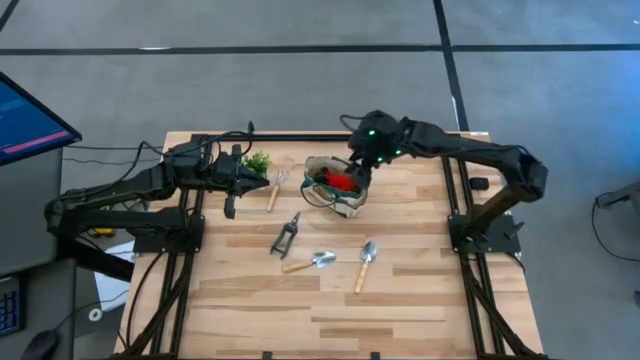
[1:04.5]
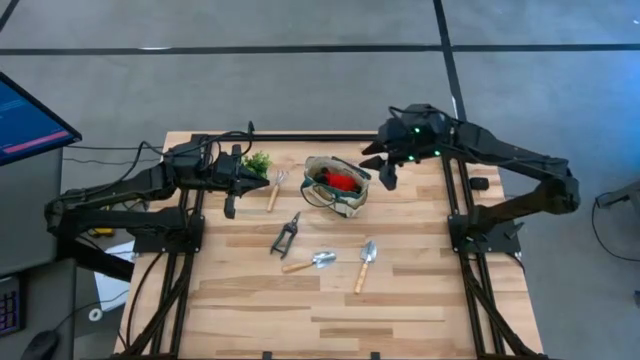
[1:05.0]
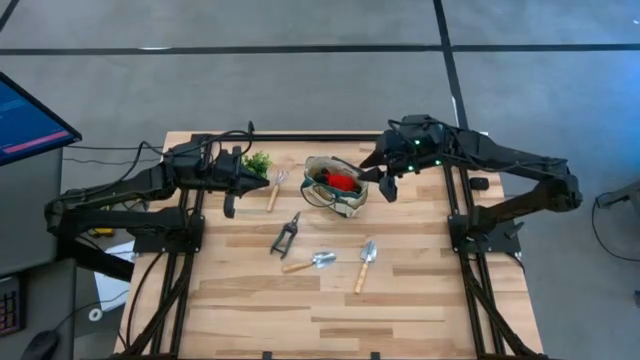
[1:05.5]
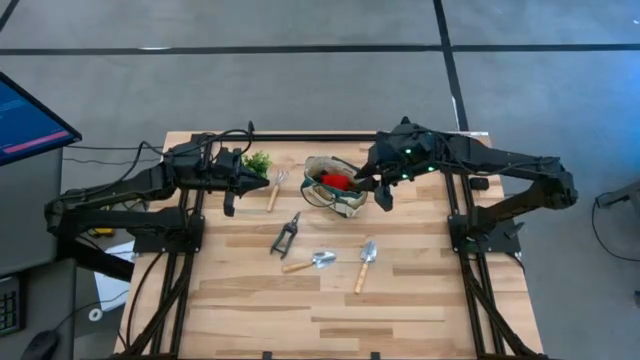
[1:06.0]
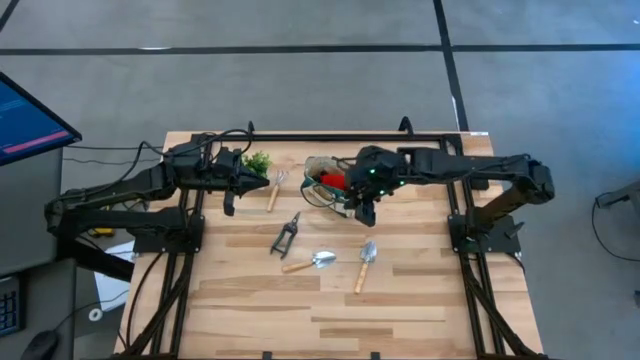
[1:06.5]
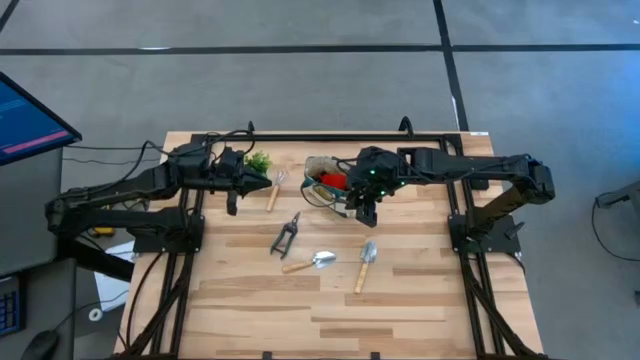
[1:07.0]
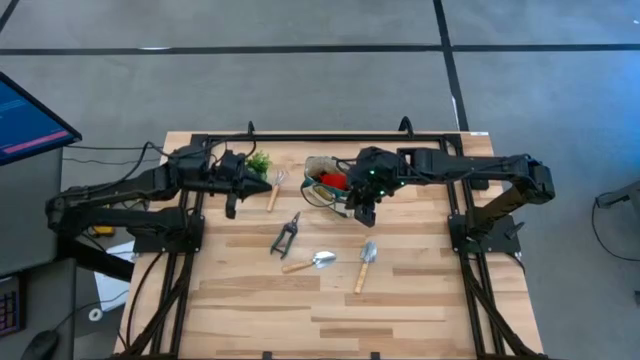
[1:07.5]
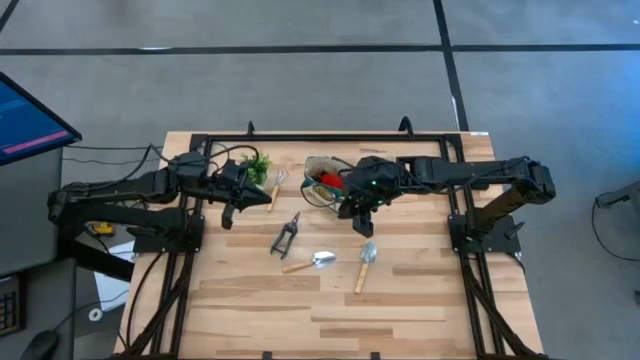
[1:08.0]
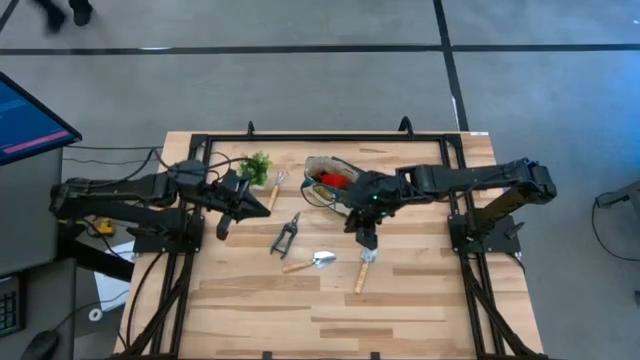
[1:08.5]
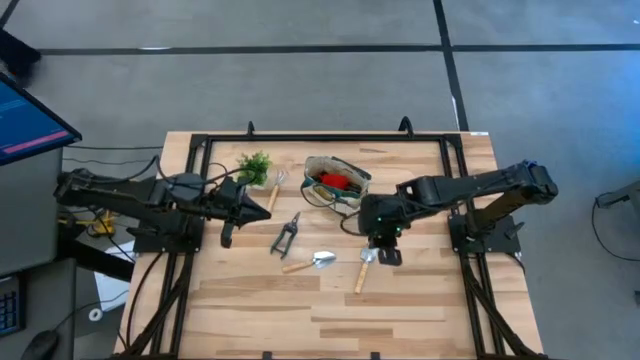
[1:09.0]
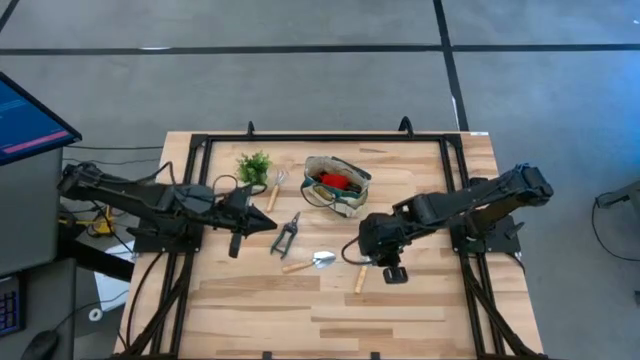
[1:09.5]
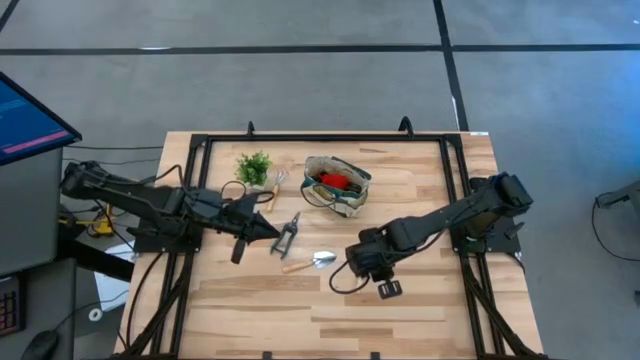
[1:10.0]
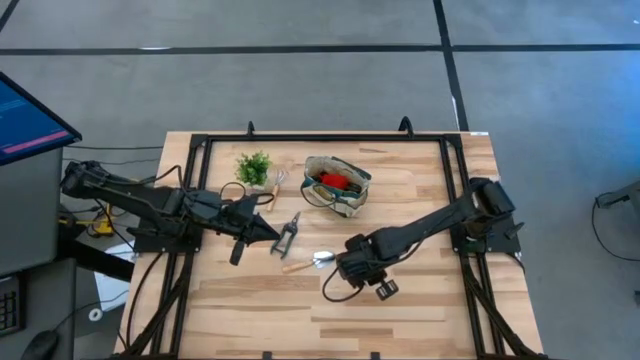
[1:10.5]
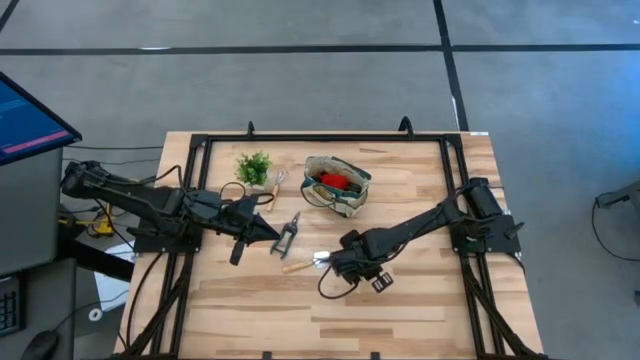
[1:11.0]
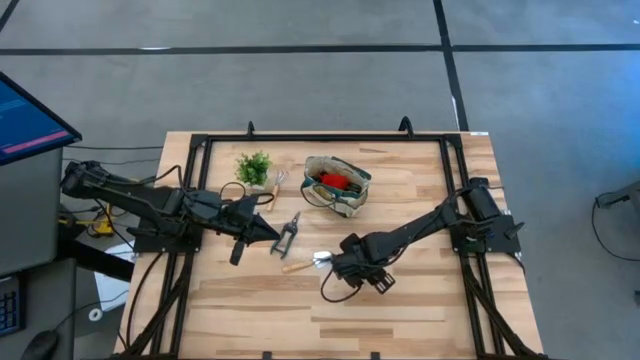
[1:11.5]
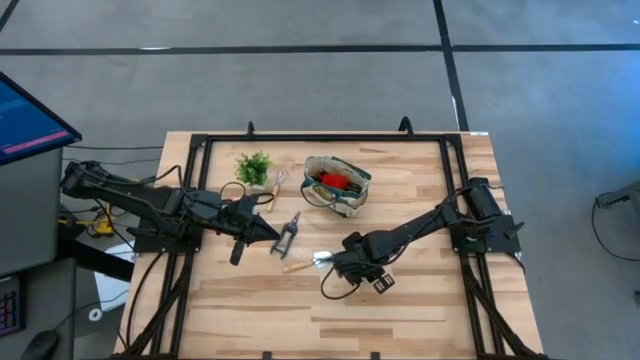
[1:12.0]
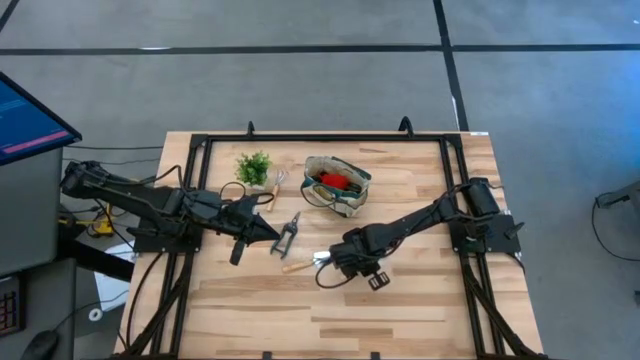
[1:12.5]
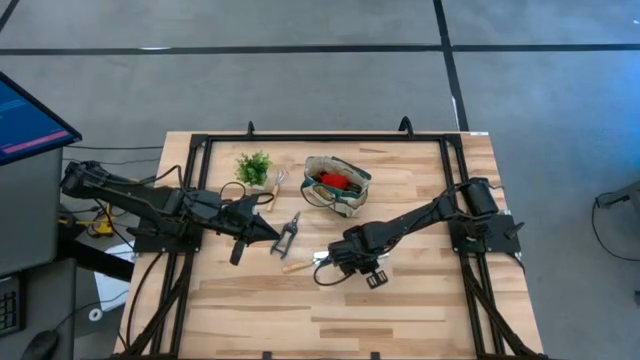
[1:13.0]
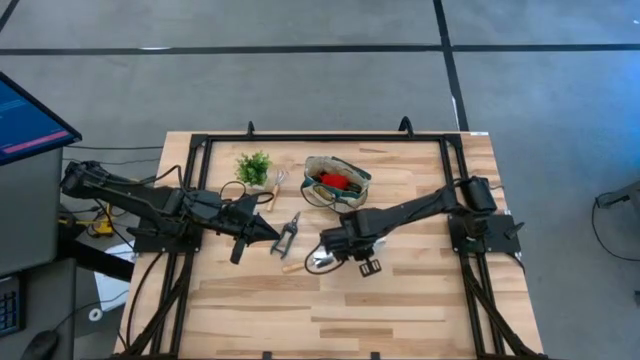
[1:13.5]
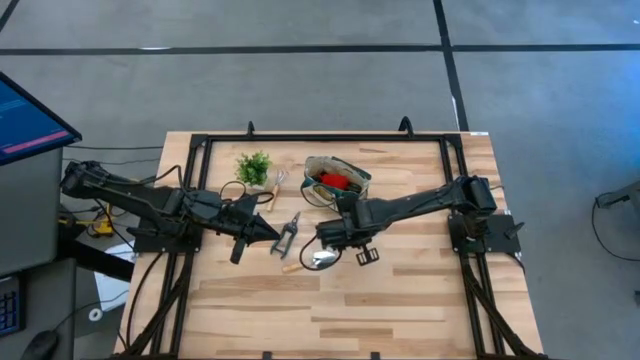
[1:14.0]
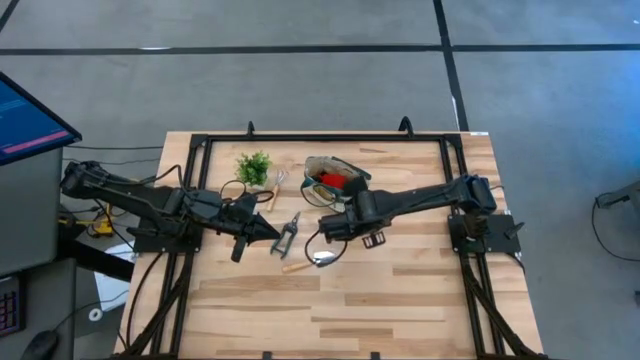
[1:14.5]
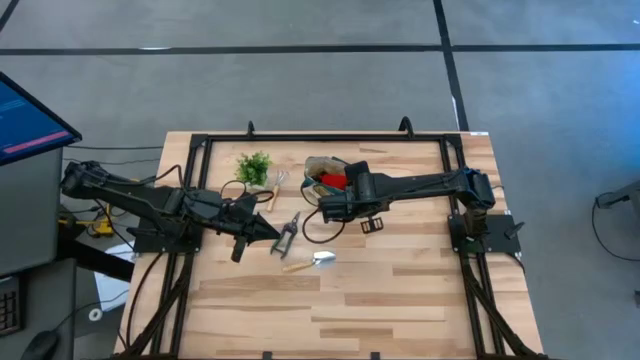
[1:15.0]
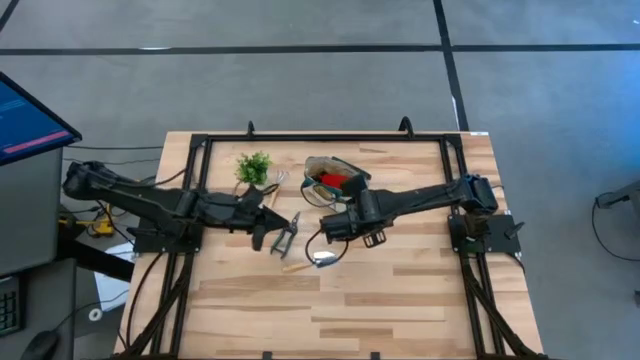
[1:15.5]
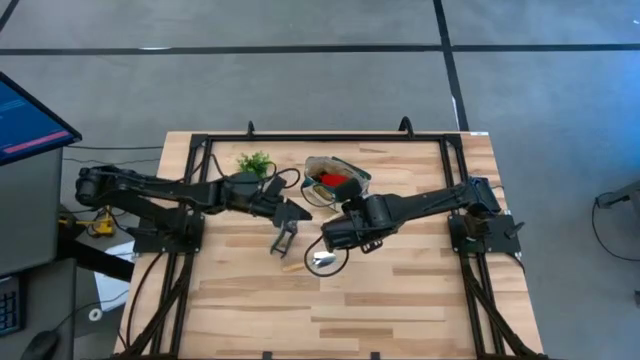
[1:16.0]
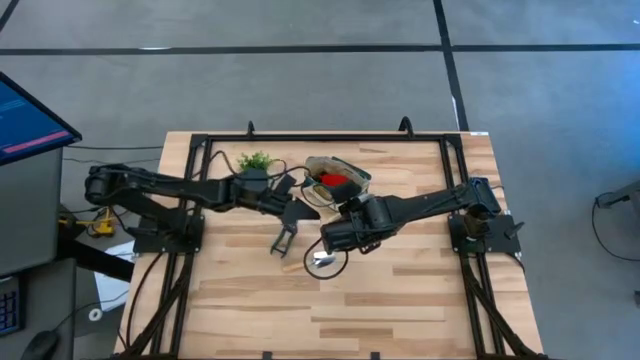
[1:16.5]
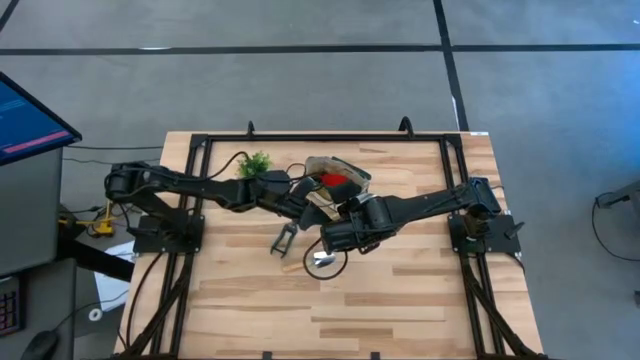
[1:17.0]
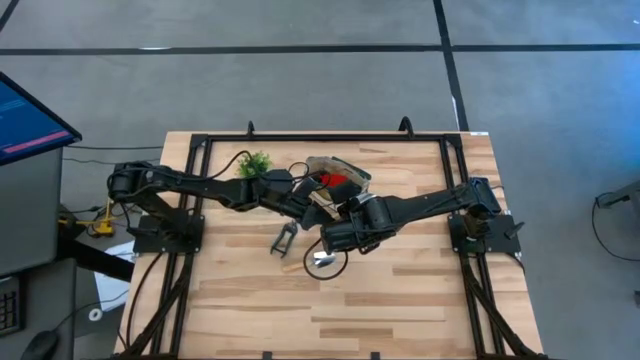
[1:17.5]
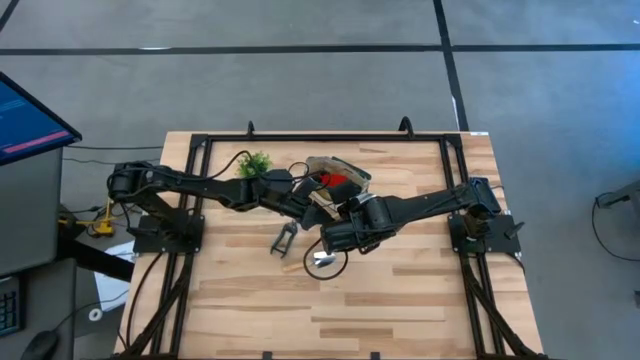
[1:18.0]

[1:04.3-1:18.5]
Task: Pick & Place Garden tools in Gardening bag
Put the right trowel into the side pocket of the gardening bag

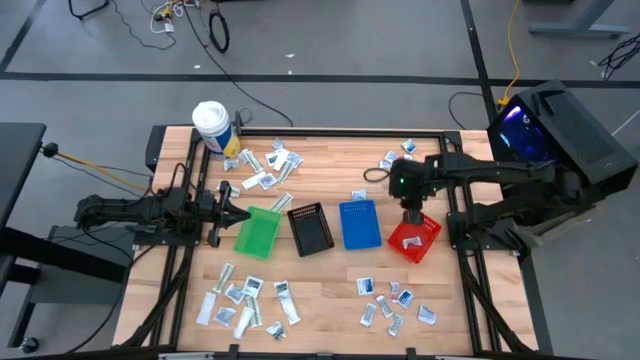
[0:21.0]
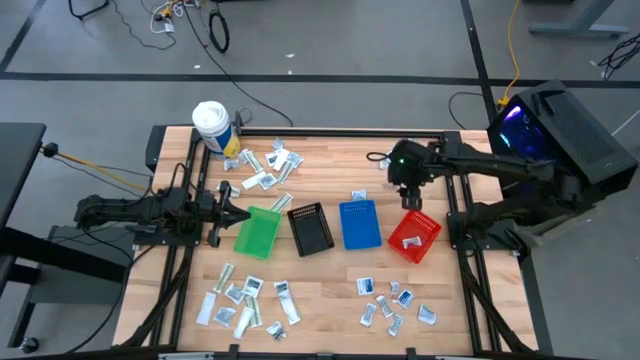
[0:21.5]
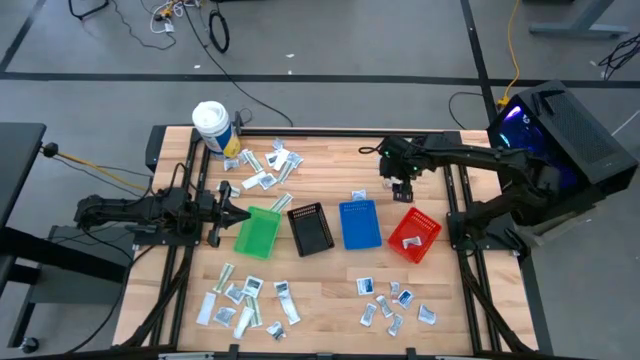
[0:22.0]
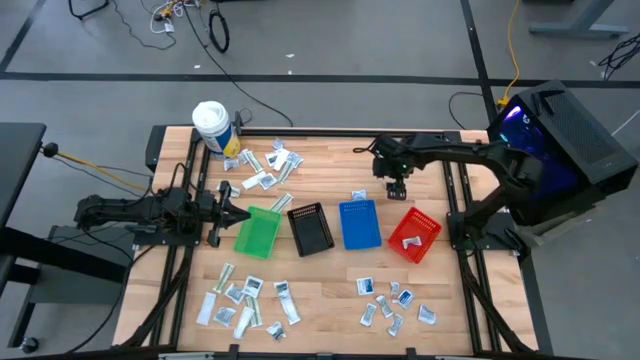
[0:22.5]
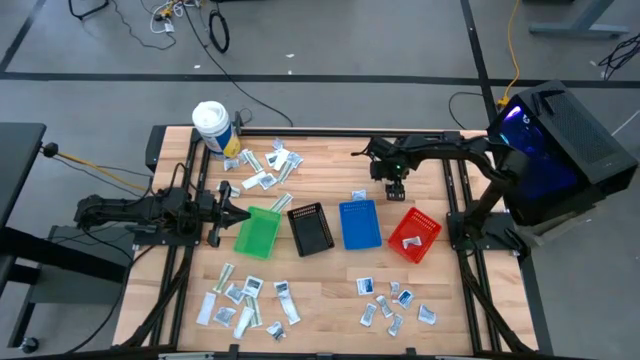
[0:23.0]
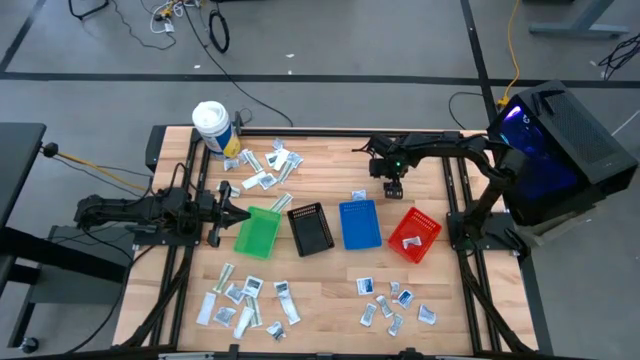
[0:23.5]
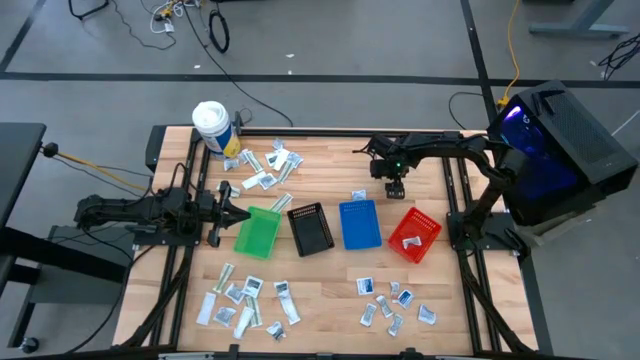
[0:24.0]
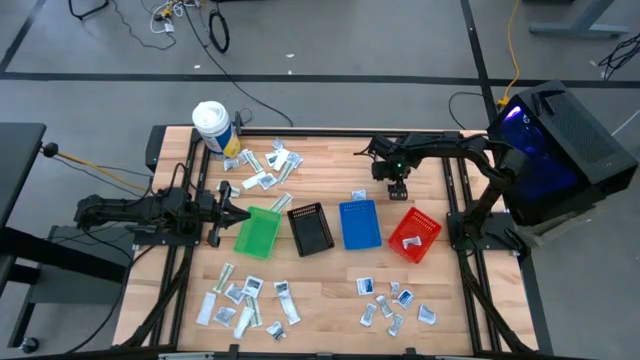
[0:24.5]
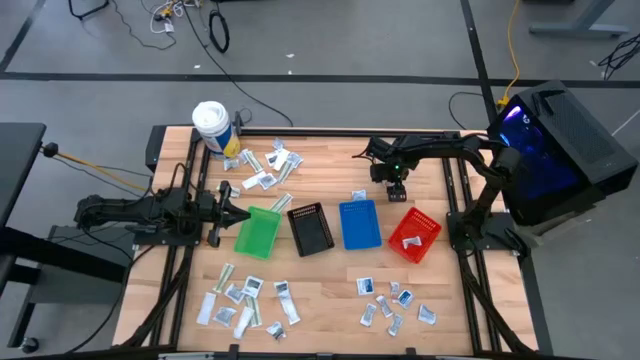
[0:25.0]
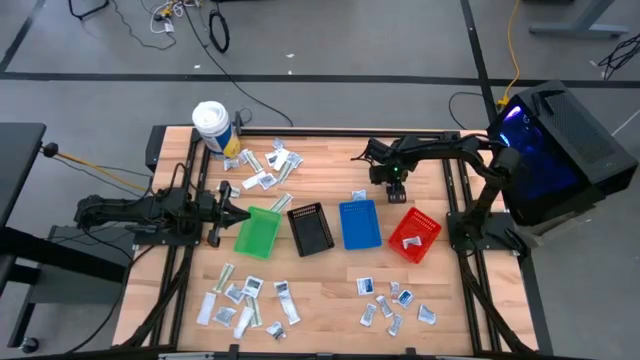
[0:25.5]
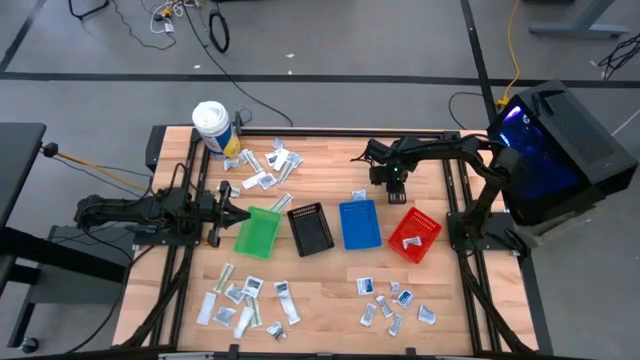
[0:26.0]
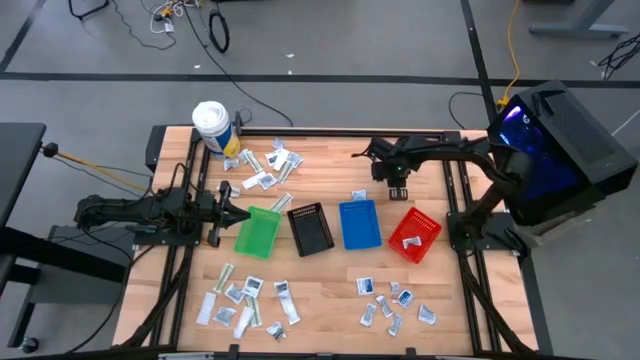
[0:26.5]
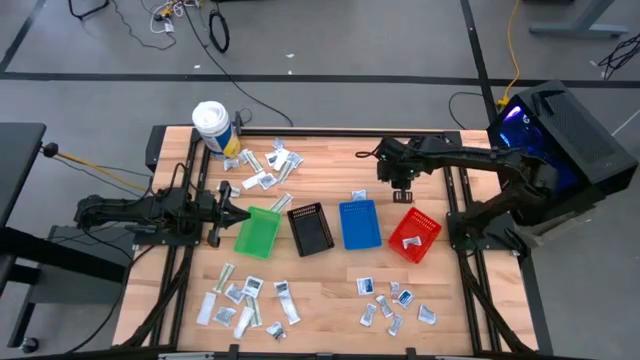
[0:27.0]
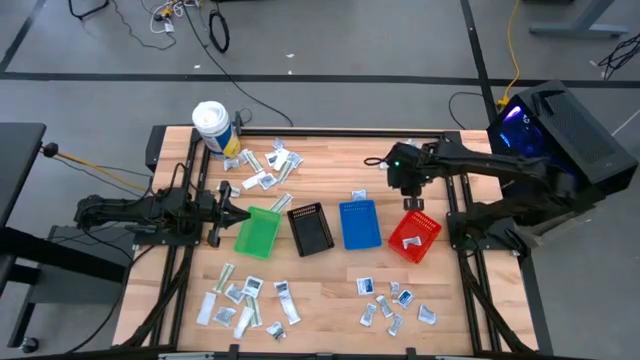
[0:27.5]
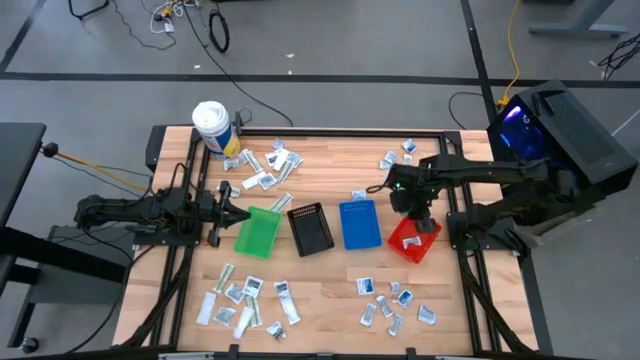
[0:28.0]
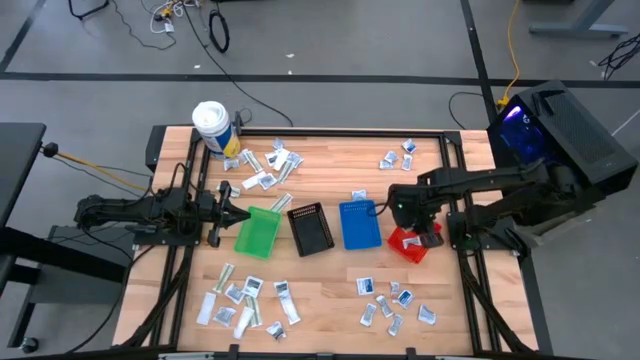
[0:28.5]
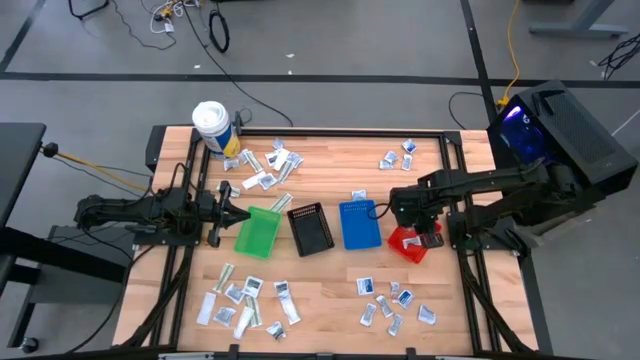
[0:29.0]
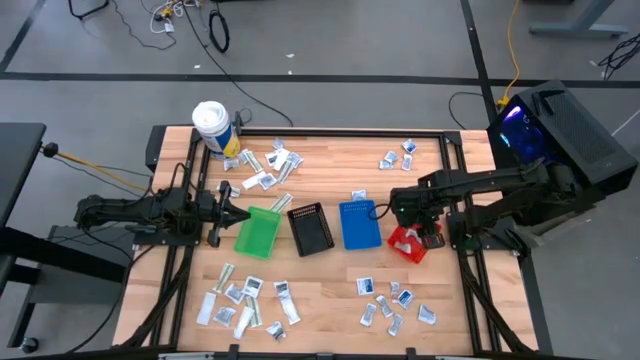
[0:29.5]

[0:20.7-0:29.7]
Task: Pick & Place First Aid Supplies
Put the ointment pack into the red basket
